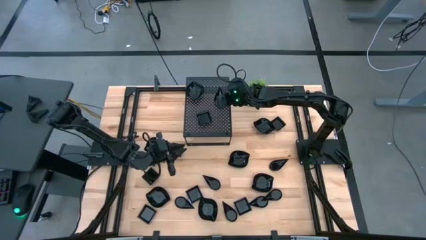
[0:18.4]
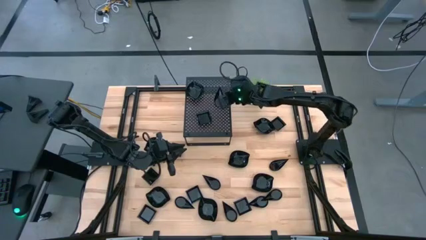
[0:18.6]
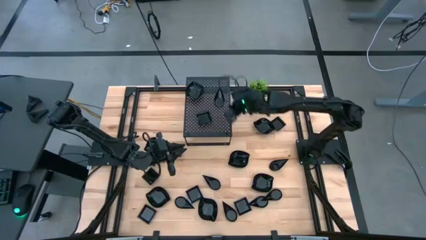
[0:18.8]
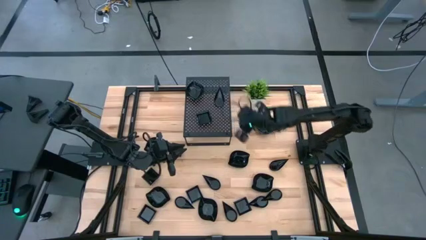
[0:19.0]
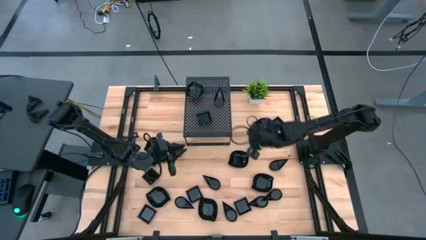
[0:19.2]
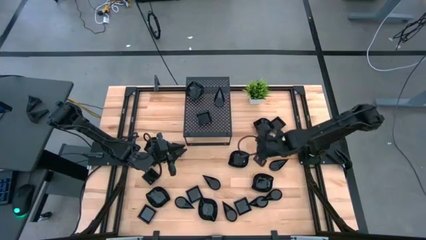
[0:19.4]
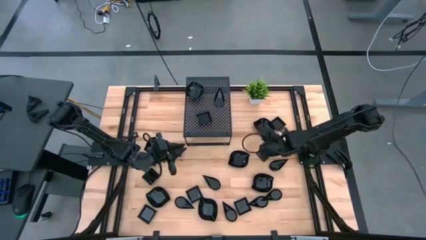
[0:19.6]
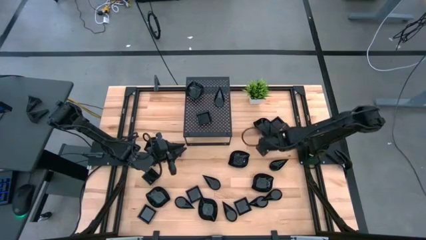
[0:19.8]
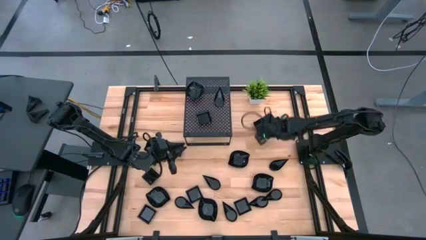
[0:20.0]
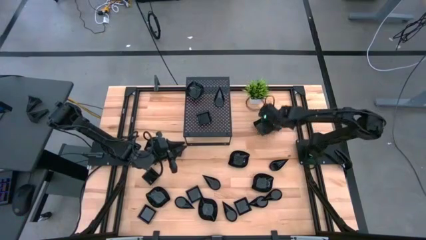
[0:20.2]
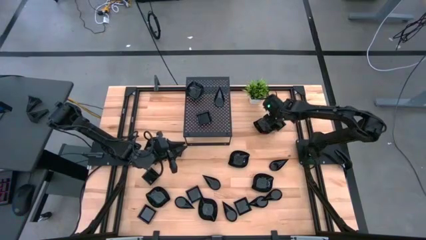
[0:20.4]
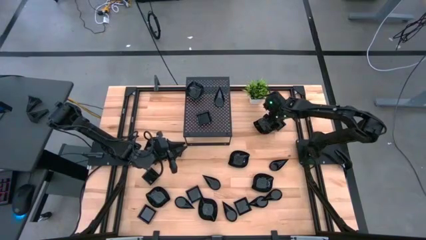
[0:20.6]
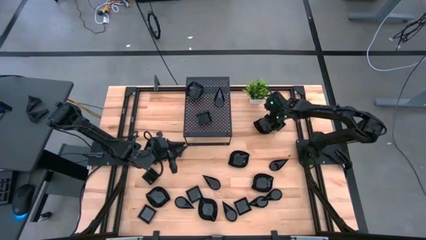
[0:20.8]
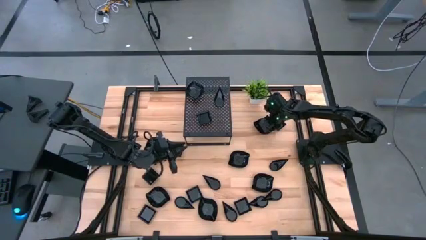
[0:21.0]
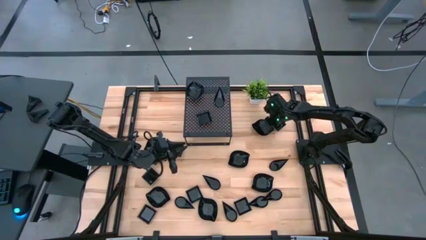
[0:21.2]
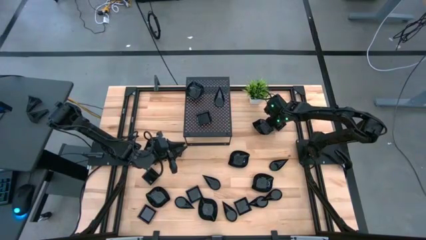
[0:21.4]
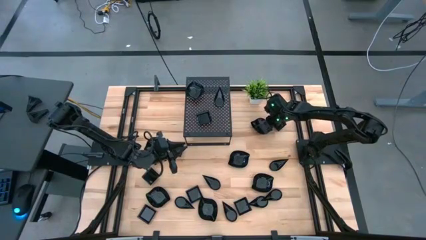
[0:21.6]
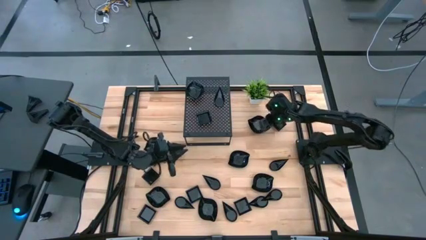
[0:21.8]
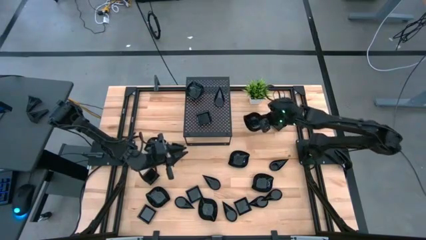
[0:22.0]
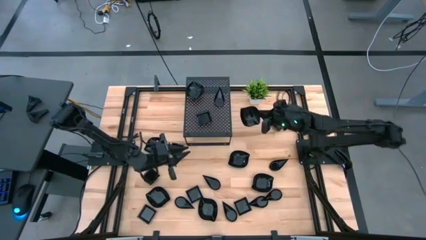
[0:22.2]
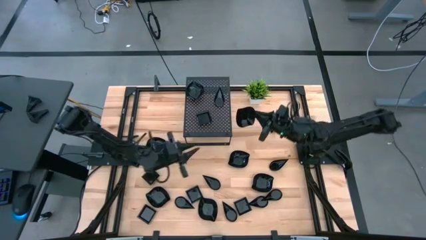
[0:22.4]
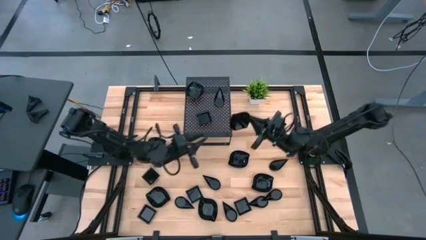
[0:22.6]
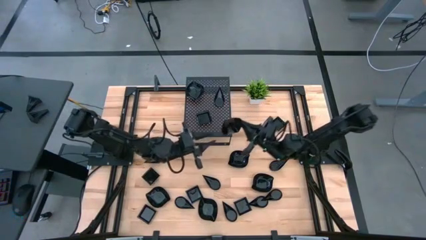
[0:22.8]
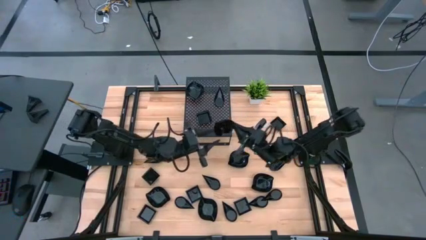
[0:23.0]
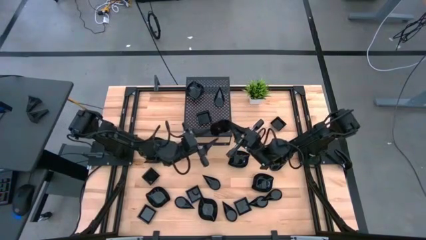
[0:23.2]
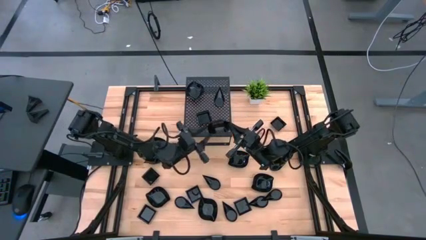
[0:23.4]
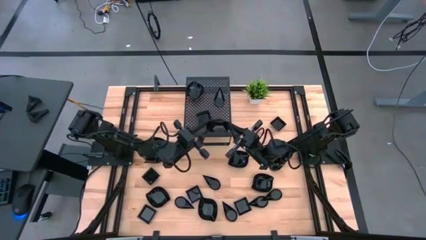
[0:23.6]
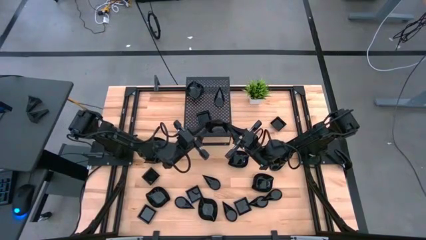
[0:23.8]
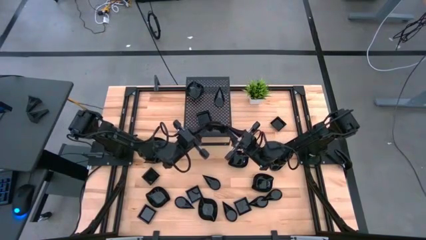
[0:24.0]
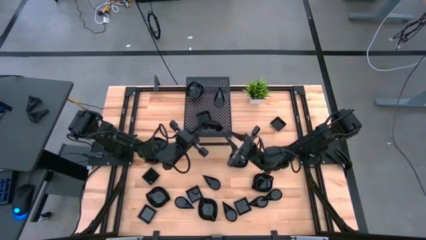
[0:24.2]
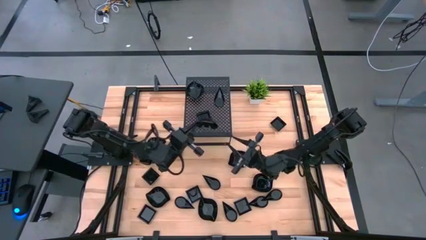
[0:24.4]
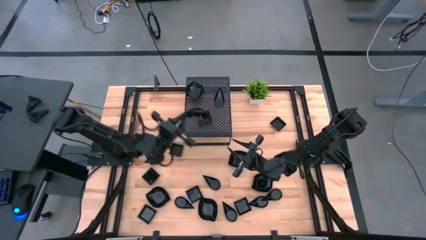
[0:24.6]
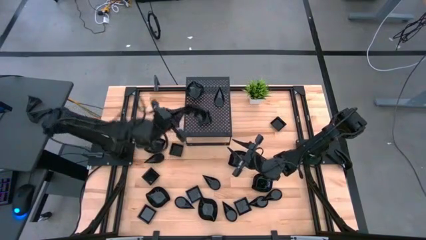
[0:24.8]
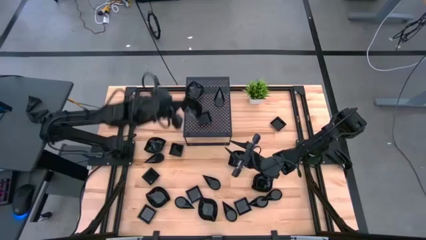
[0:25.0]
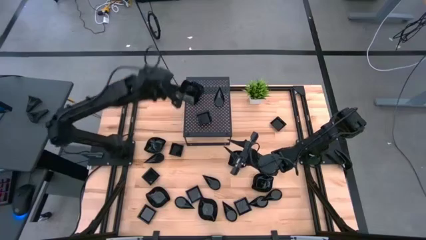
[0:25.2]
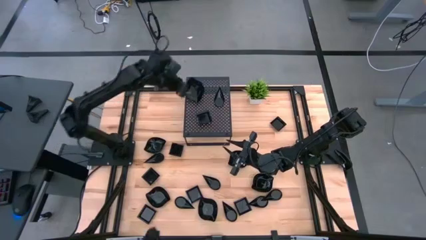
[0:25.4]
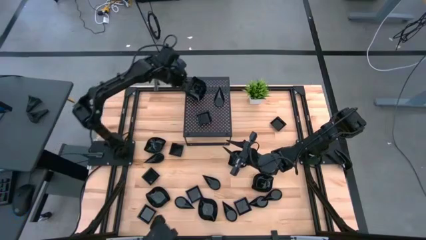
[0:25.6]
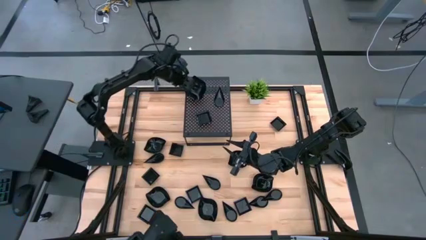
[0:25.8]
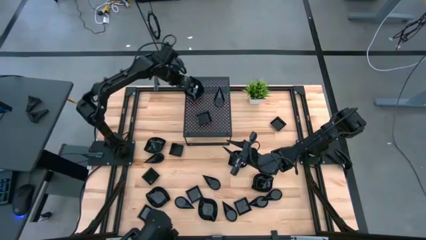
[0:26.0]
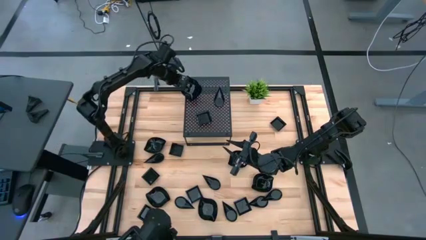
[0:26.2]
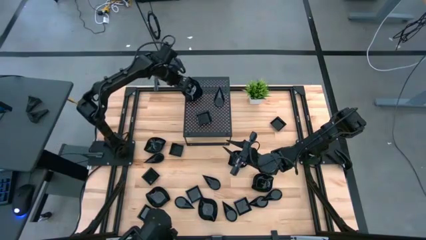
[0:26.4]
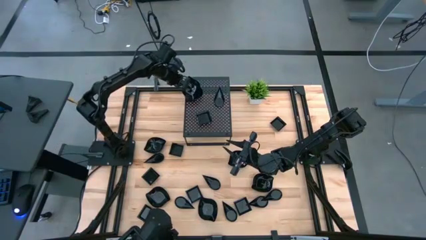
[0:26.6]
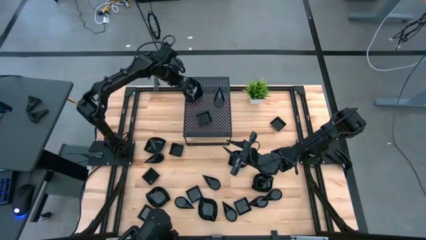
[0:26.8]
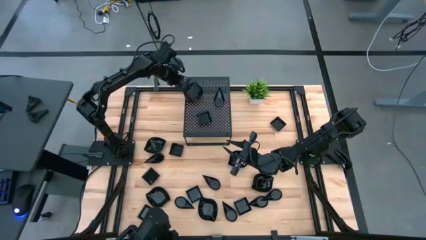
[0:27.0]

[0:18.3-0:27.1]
Task: Pick & Place Mini shaped plates
Stack the leaf shaped plate on top of the other leaf shaped plate on the shelf

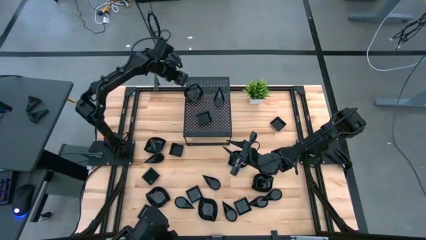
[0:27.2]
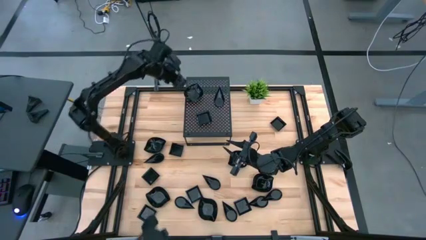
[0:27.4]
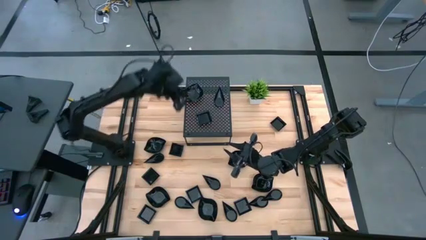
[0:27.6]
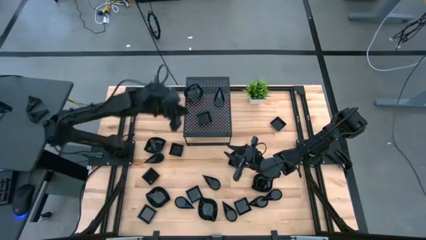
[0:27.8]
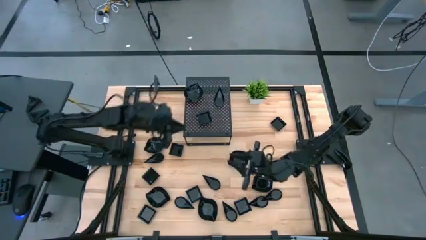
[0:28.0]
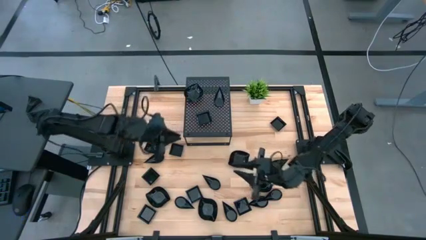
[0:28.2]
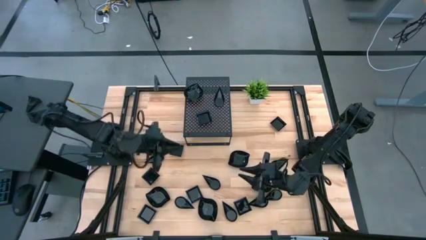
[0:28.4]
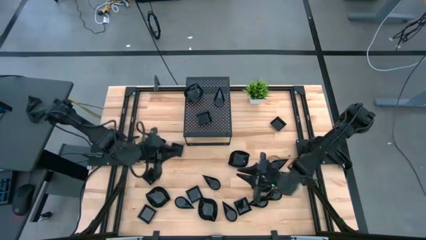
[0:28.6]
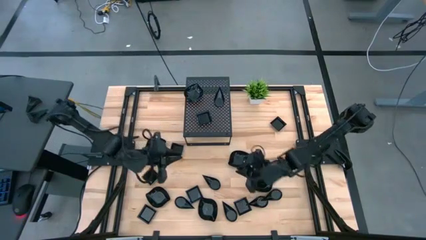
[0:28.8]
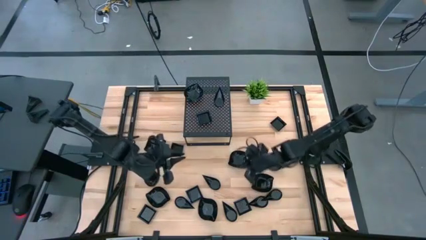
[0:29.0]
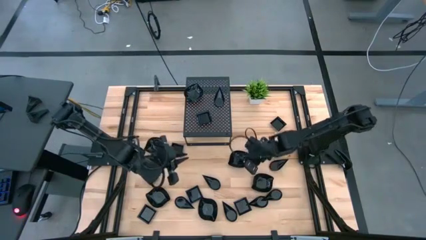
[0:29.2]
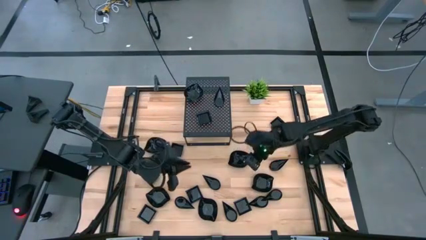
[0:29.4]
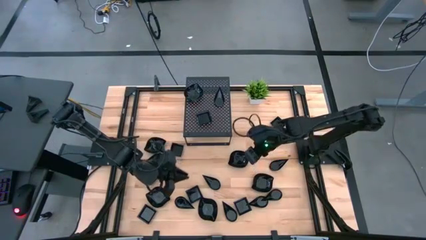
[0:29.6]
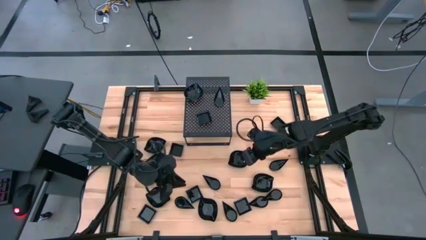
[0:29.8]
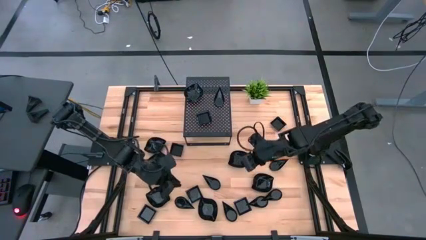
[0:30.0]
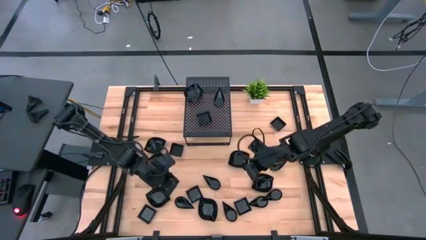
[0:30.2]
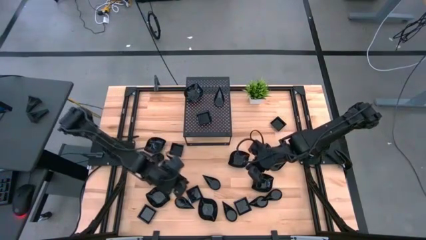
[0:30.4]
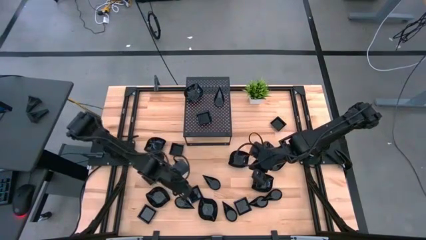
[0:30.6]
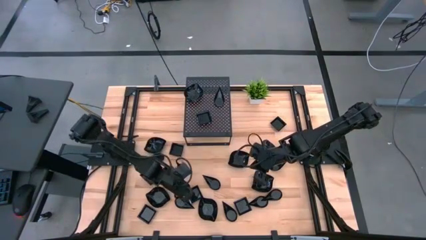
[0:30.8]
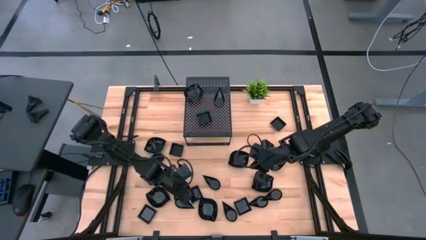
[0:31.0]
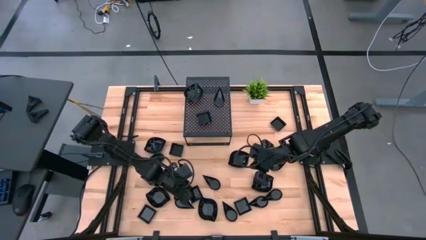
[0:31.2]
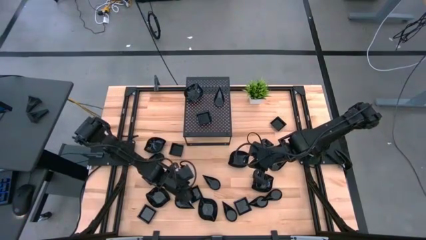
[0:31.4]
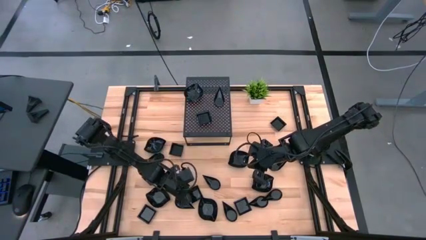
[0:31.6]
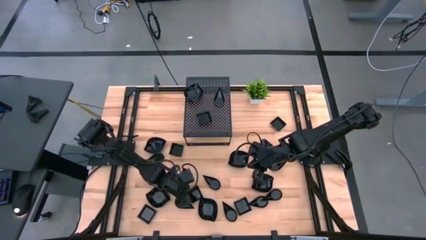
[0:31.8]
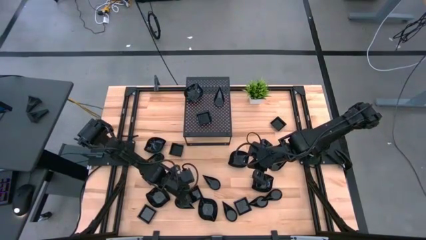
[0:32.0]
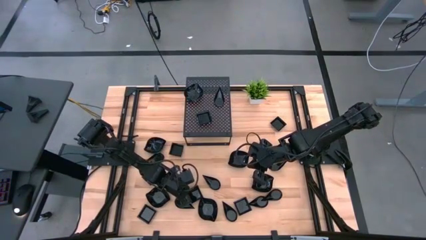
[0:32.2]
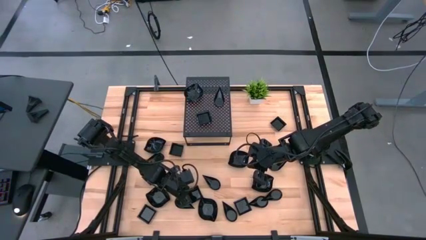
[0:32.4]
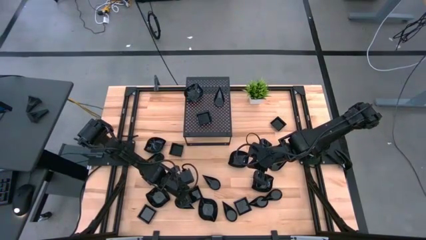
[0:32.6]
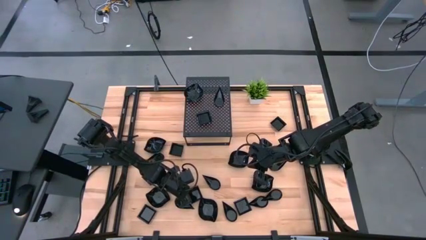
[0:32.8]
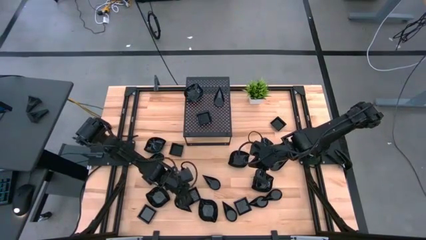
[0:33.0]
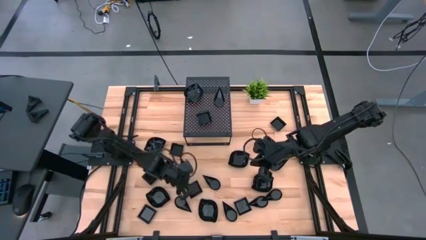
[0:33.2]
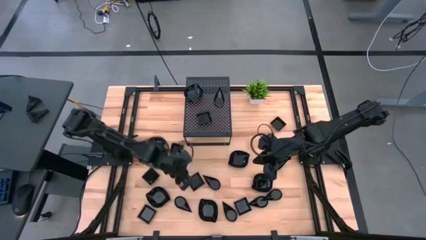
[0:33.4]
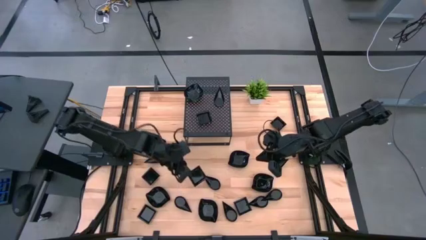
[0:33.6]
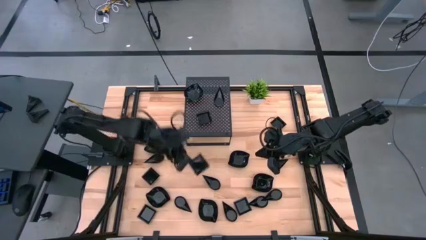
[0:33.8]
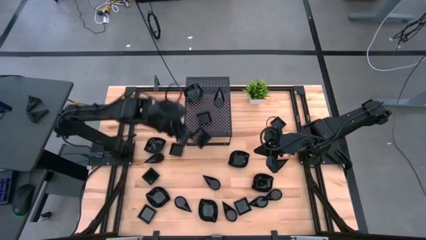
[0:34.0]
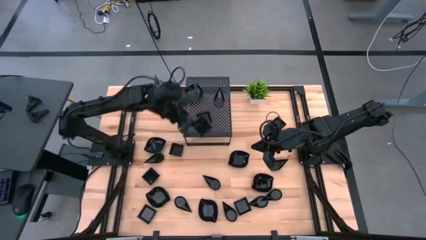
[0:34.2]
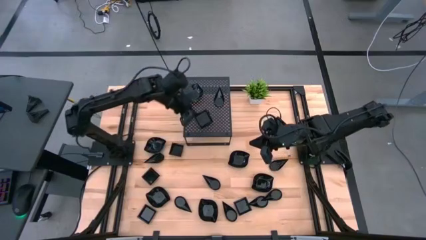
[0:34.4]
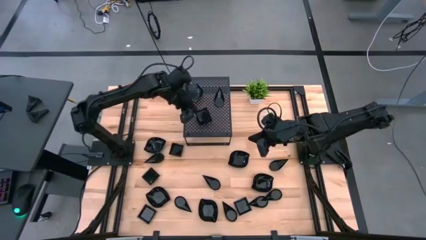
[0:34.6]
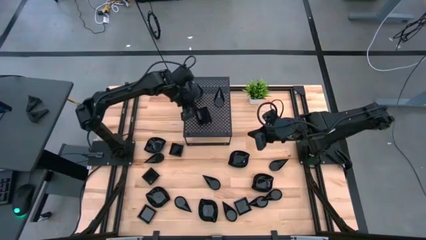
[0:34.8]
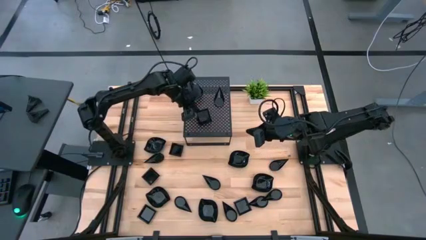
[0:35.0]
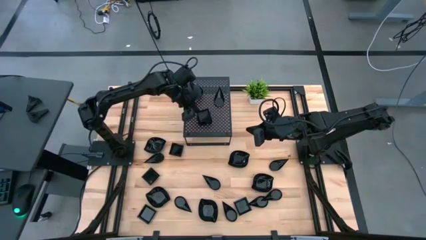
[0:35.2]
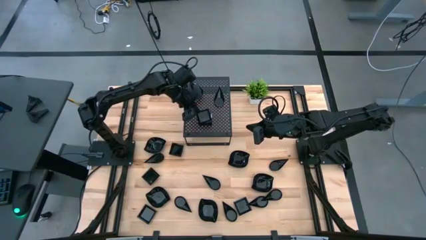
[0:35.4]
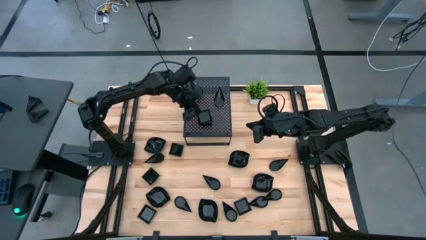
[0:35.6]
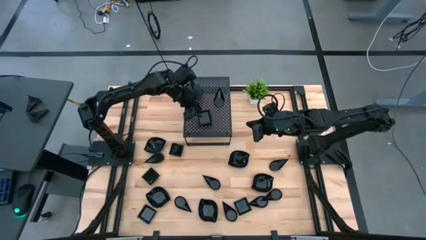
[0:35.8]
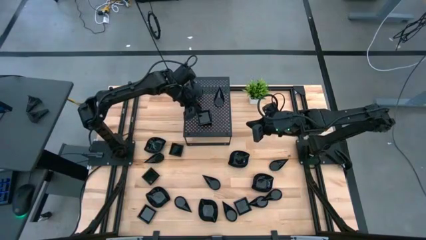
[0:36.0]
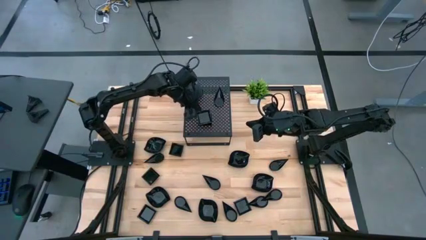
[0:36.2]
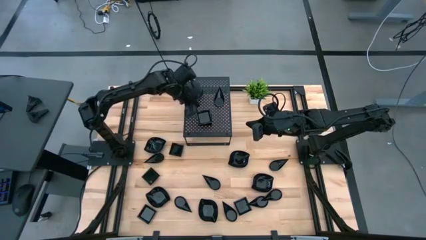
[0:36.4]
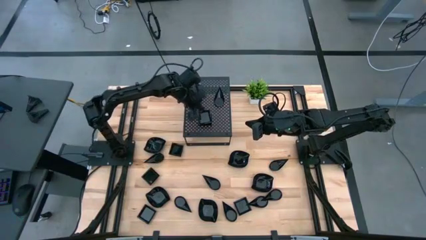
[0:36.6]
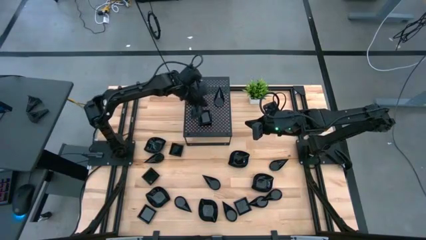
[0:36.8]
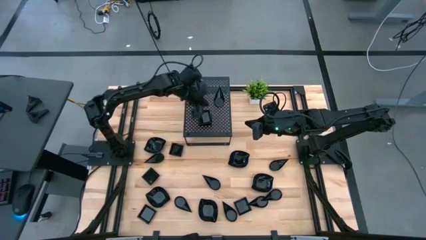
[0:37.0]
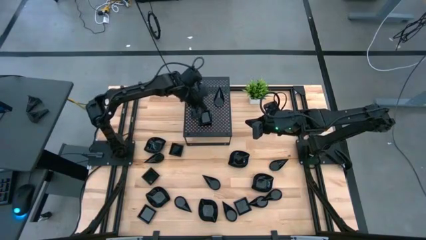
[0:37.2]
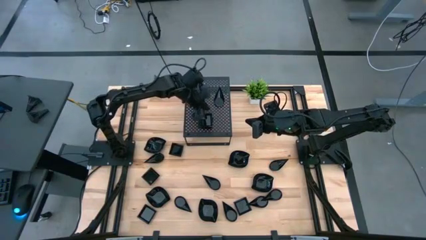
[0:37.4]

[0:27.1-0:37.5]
Stack the square plate on top of the other square plate on the shelf
